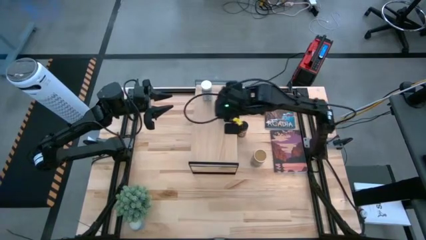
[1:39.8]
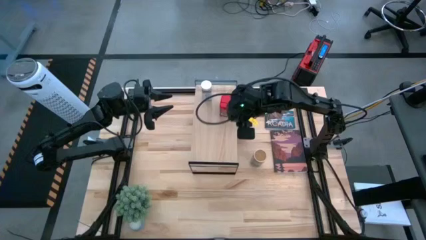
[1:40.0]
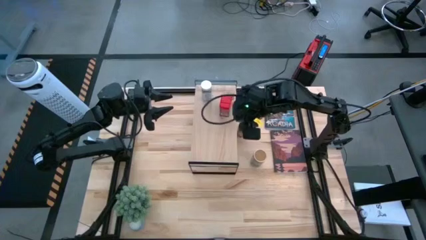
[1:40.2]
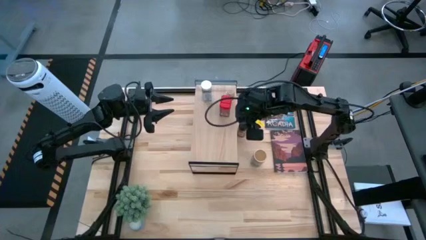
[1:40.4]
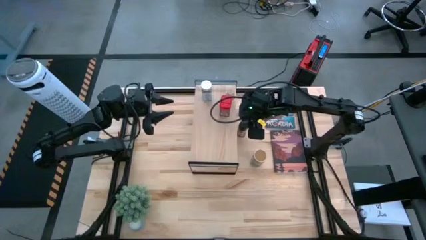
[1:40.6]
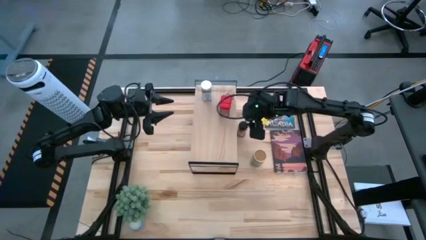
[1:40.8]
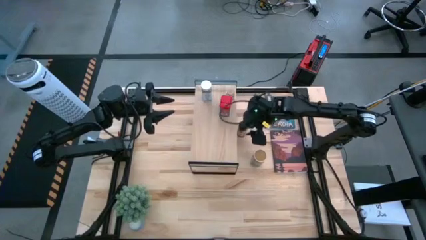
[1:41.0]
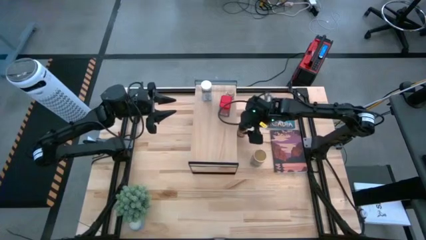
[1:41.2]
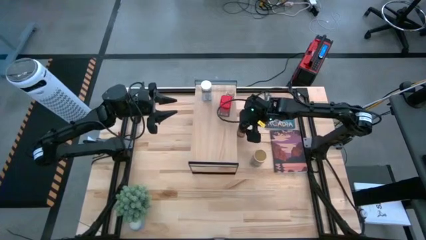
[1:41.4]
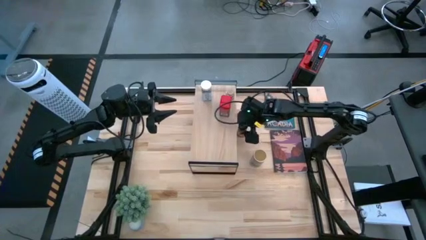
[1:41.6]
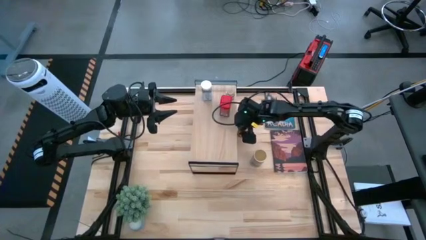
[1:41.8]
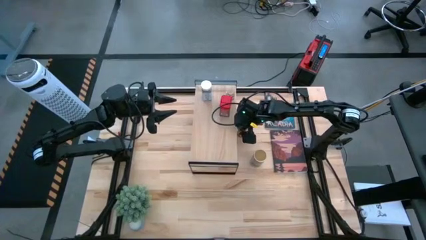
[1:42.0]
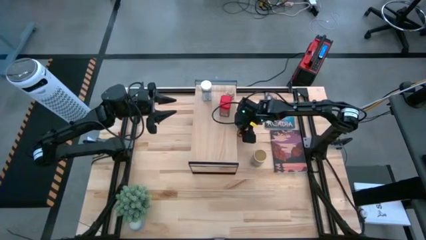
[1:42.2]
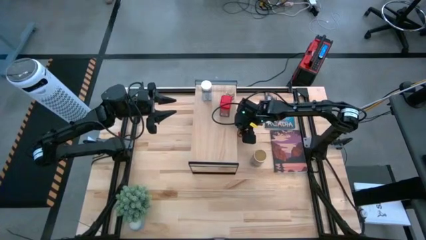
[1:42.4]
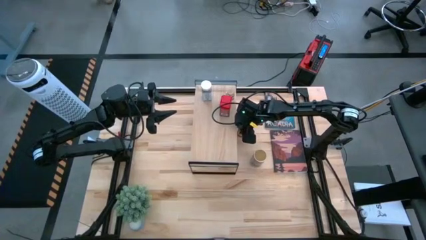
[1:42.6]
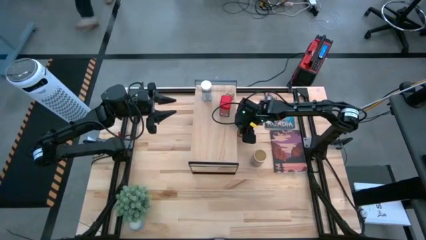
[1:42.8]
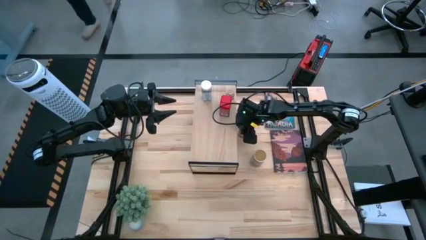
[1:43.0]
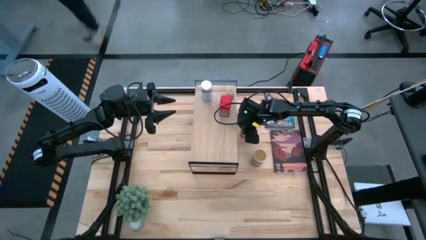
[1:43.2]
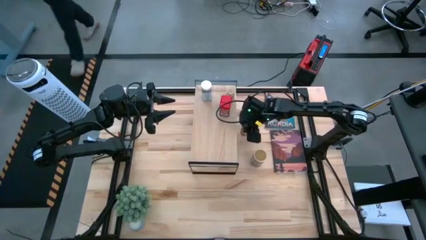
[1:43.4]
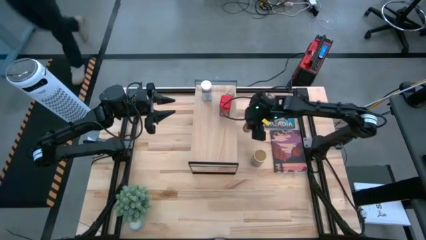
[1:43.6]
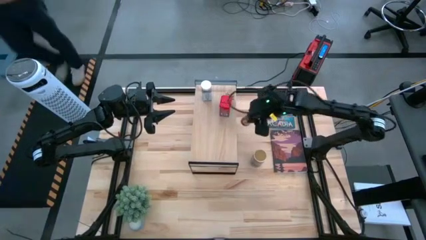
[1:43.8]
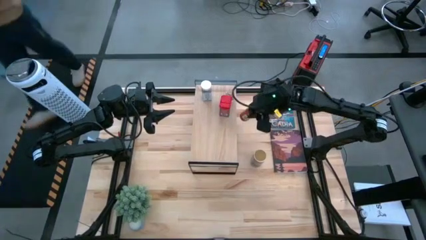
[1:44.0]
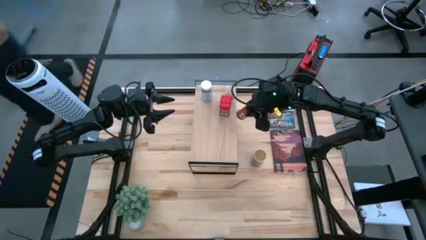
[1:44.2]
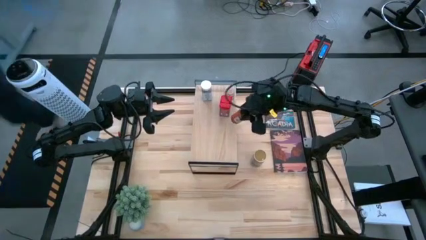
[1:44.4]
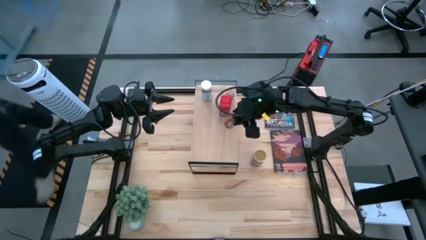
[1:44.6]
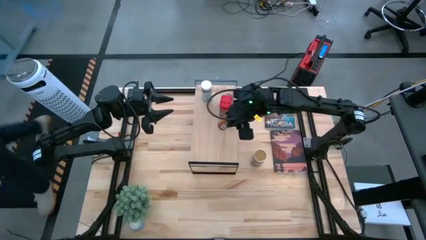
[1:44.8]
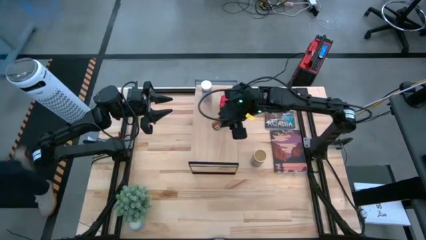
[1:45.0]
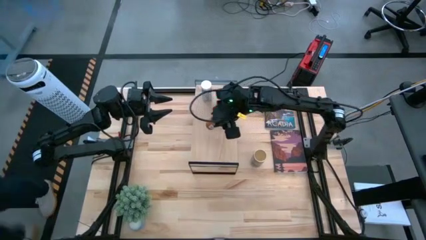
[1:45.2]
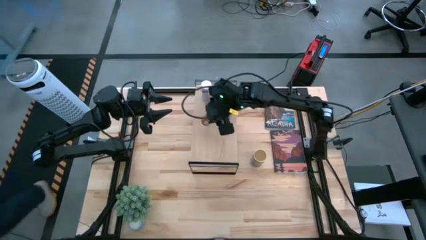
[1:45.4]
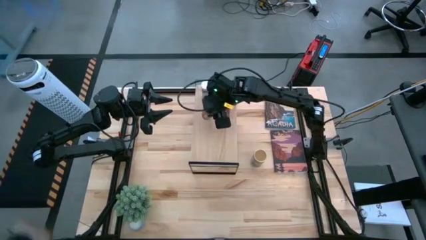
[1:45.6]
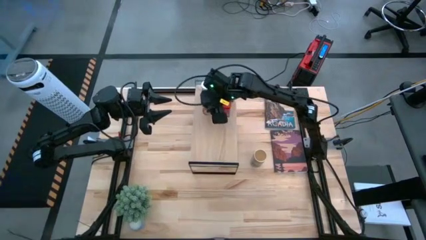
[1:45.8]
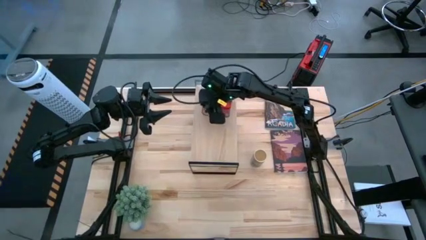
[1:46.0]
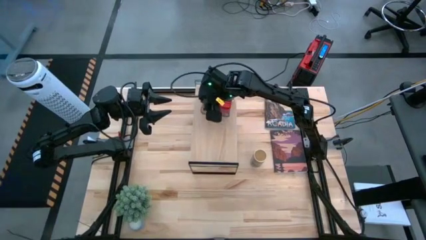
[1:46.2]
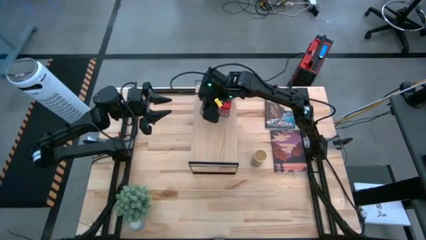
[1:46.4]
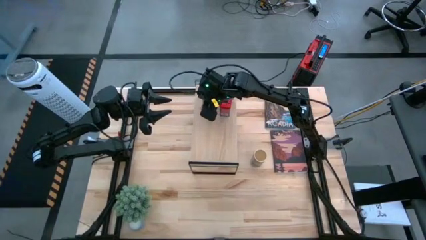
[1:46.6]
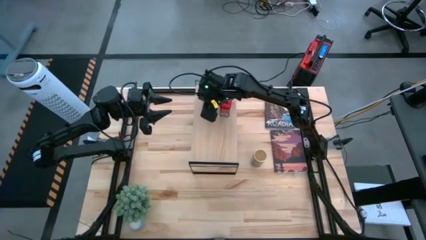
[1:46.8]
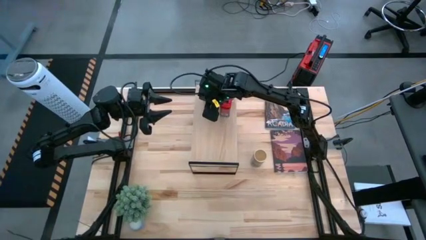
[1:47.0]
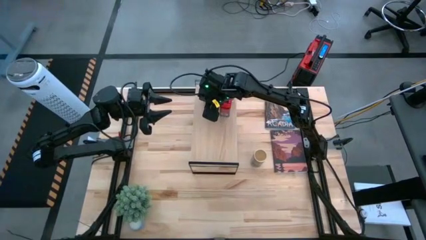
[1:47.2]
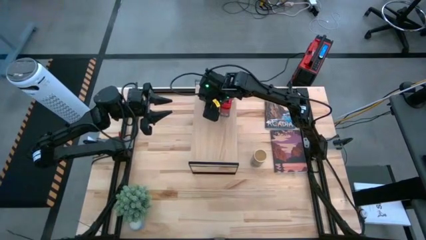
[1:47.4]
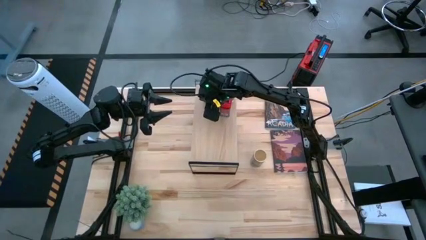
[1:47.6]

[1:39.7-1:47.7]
Task: Shelf spices
Put the black seasoning bottle on the shelf

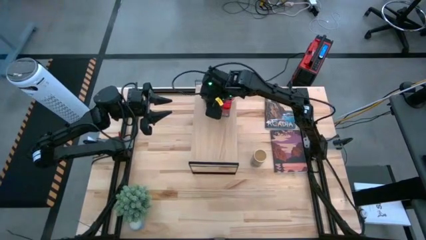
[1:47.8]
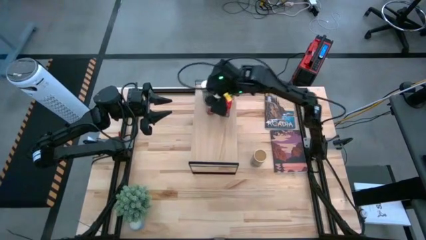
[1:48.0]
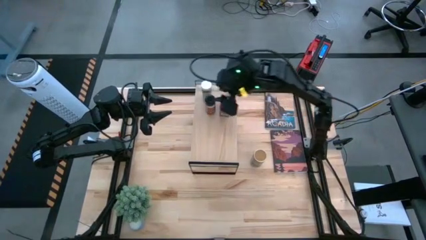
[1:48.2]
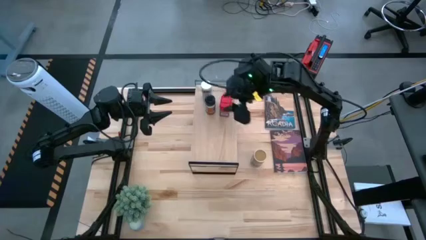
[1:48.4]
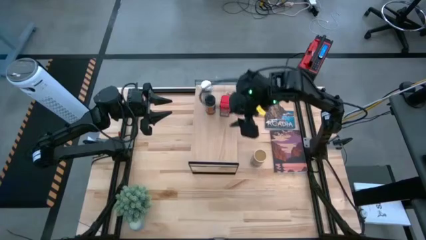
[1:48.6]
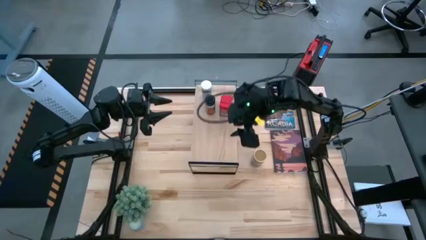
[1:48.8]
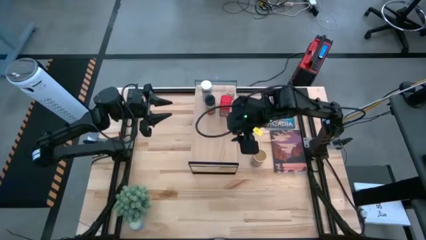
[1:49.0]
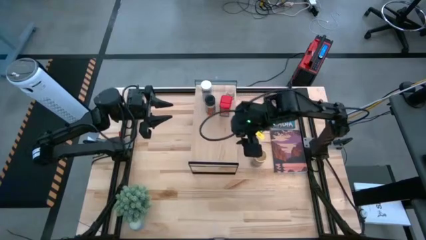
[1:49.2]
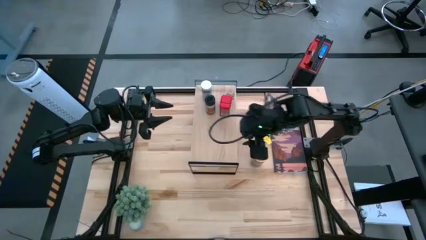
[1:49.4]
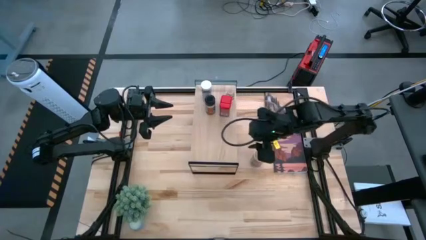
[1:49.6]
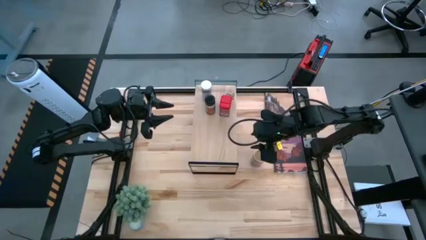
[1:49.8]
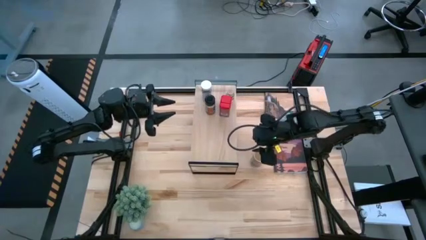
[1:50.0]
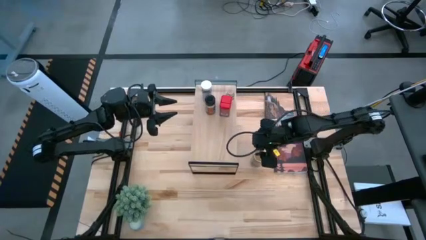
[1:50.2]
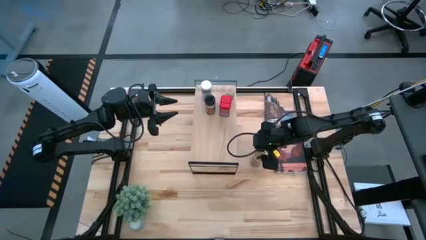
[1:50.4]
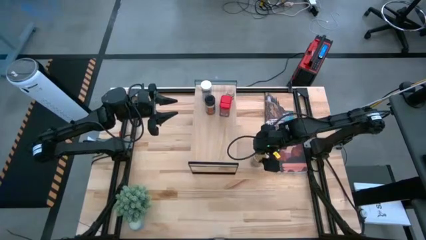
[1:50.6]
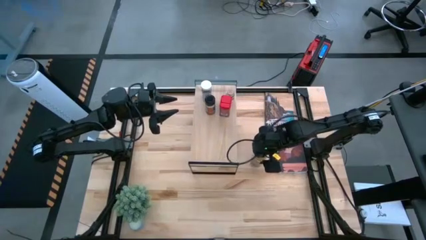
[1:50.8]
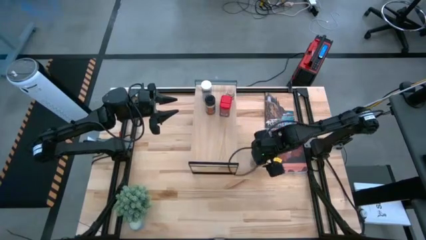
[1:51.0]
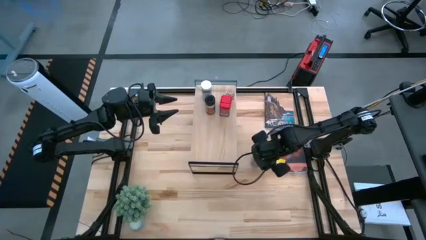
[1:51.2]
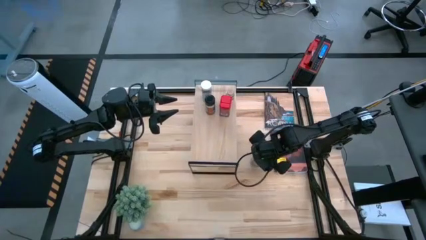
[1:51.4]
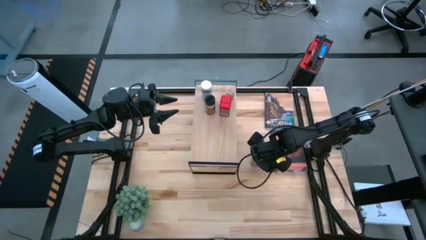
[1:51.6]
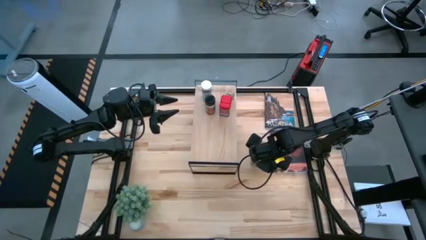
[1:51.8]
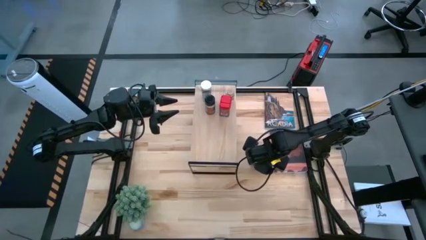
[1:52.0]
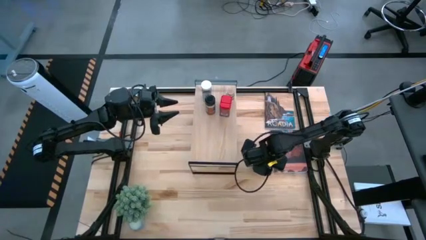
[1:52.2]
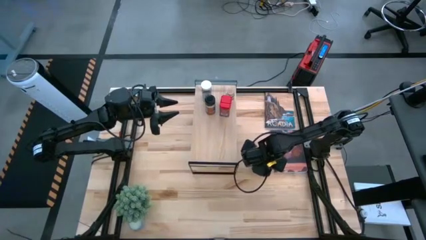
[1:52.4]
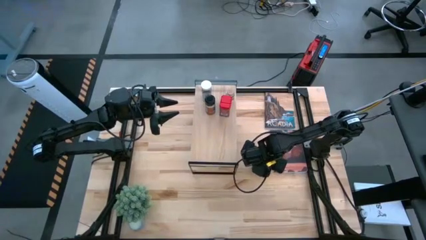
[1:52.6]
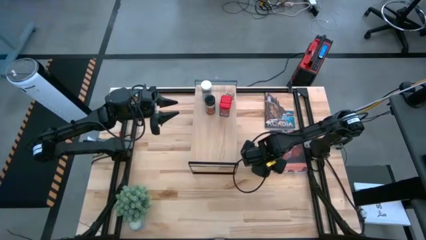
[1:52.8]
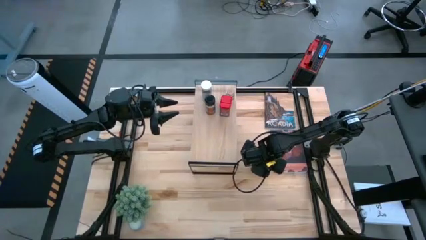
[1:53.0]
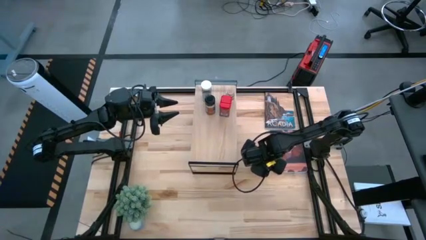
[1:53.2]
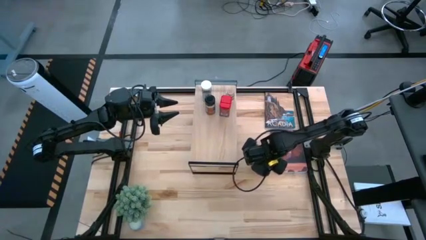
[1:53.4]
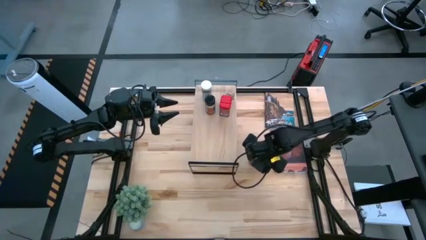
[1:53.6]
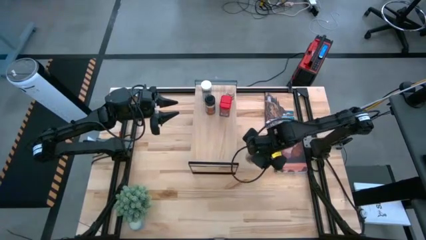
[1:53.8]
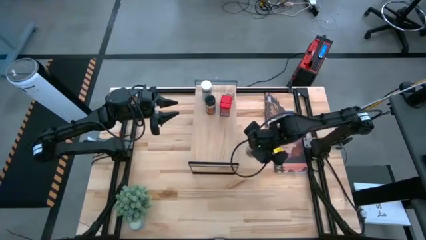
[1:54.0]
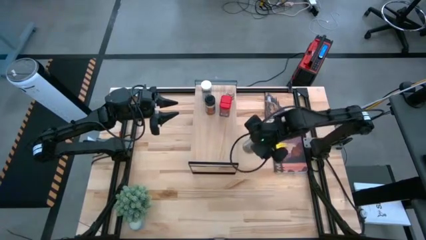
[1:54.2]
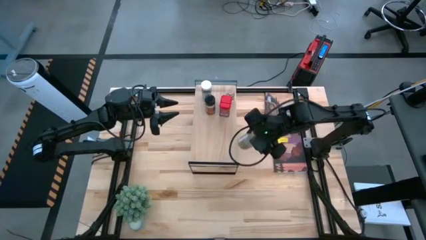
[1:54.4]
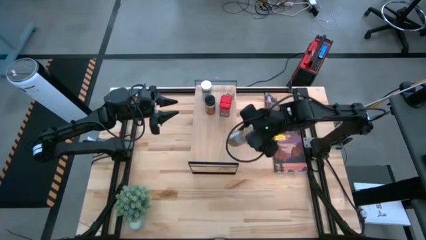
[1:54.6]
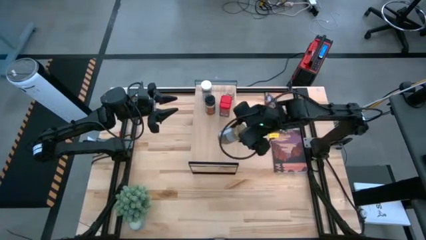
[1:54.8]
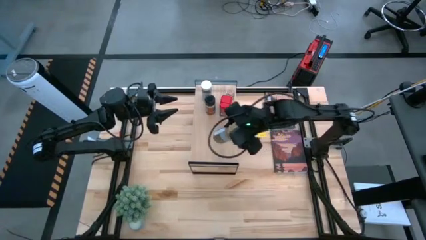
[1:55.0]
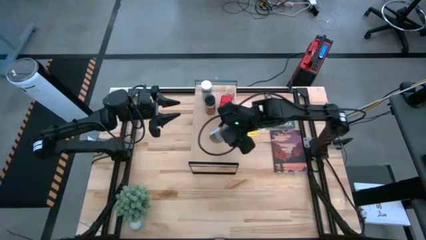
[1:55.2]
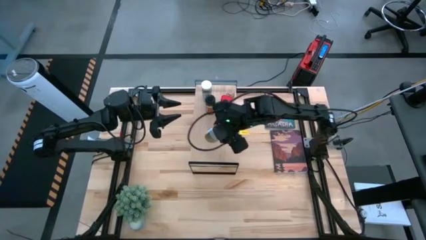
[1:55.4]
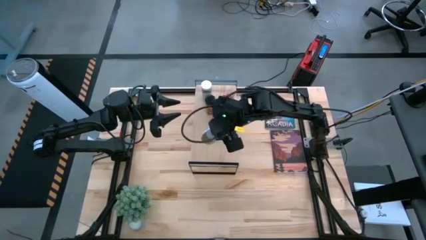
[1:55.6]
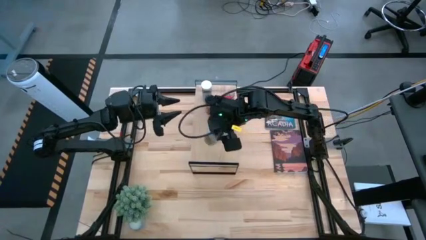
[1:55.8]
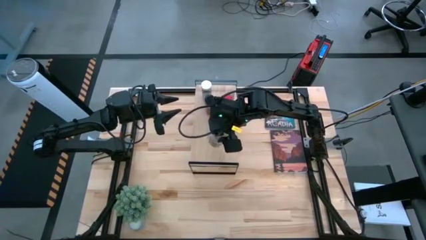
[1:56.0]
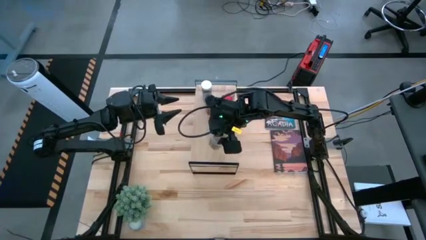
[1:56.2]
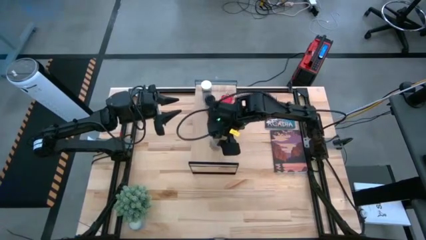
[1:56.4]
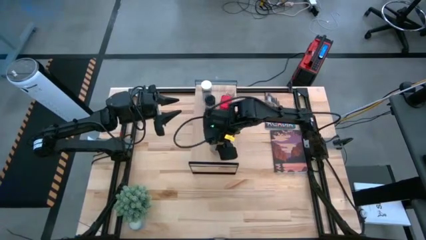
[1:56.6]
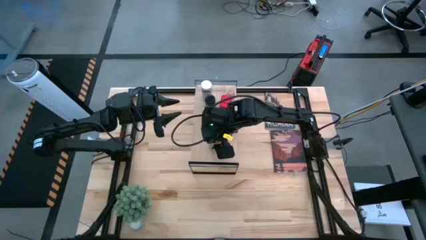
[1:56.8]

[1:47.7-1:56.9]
Put the brown seasoning bottle on the shelf
